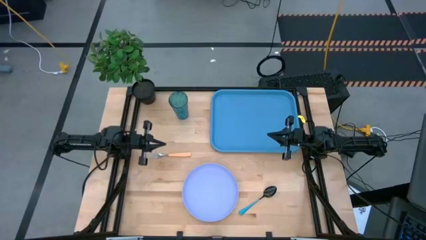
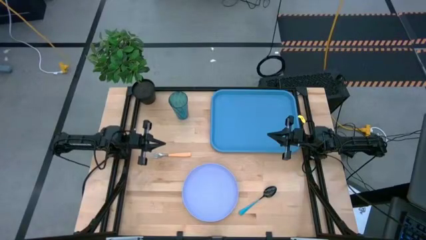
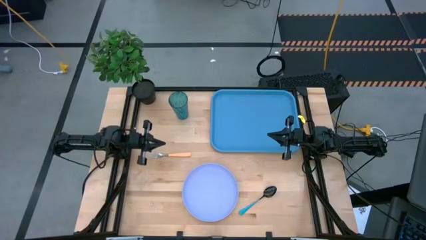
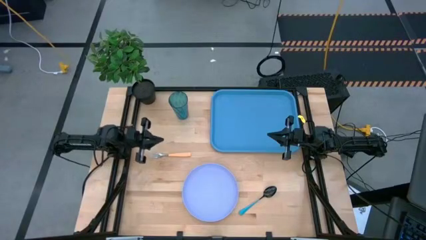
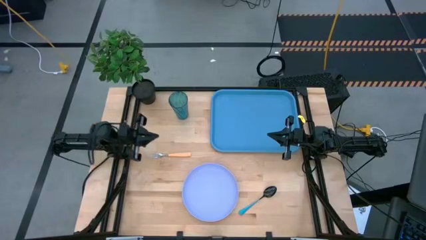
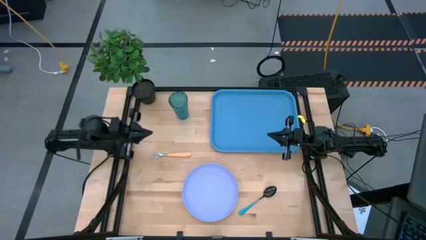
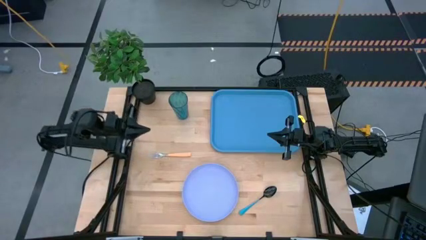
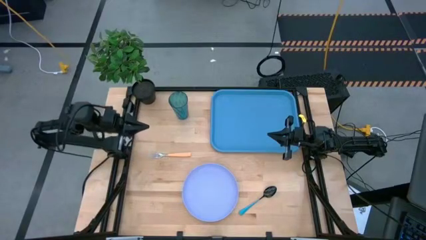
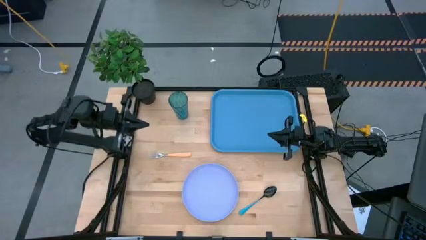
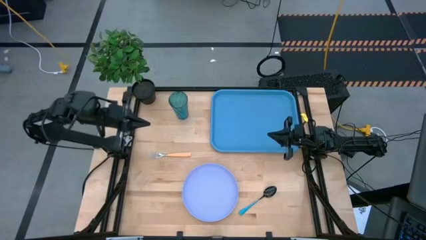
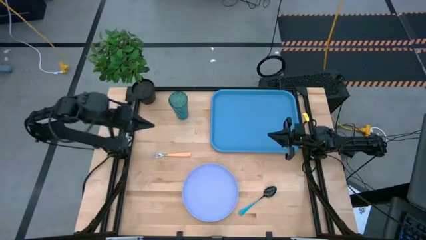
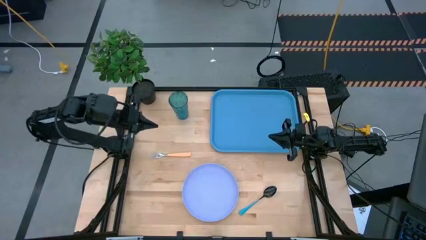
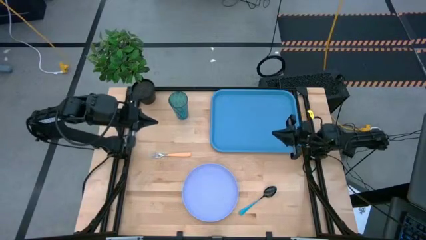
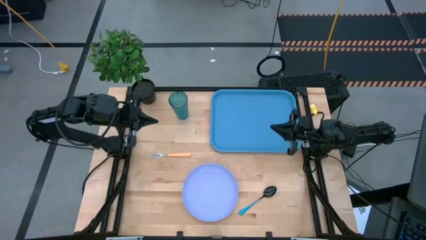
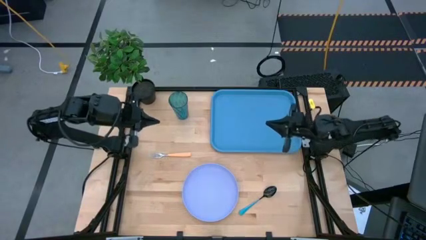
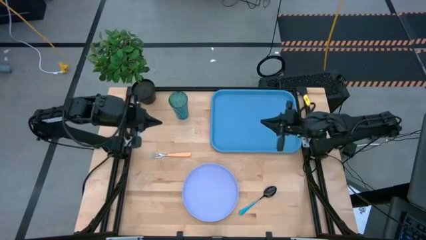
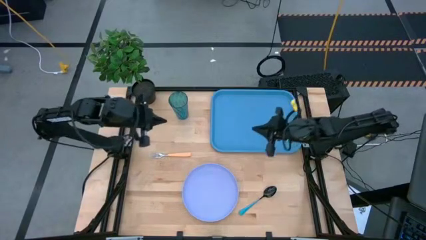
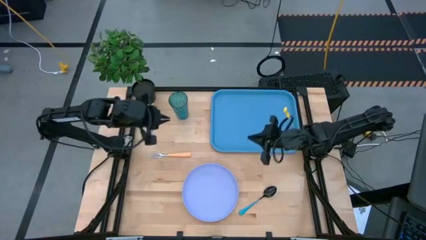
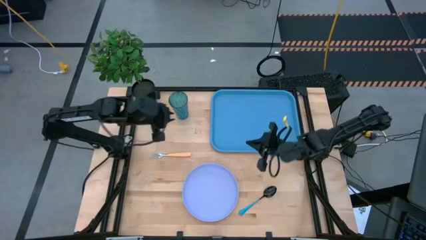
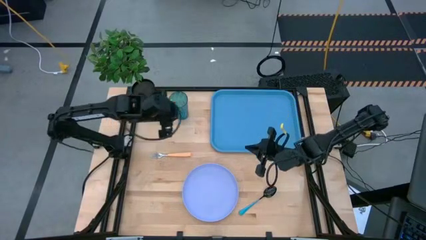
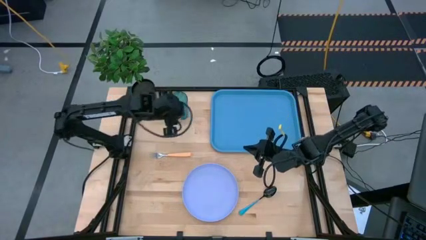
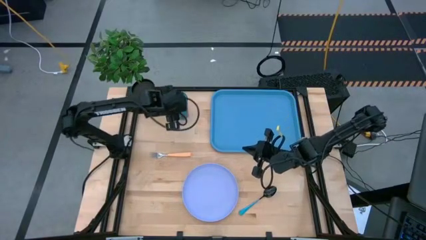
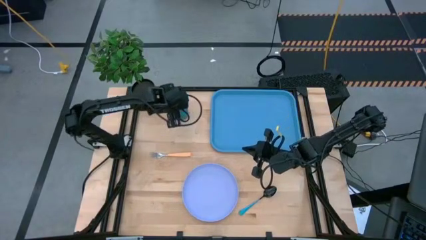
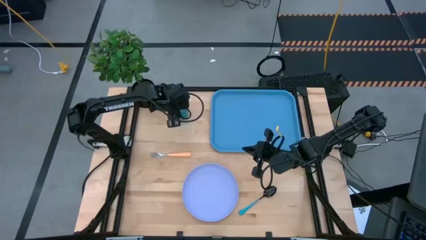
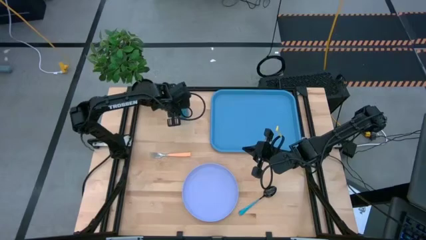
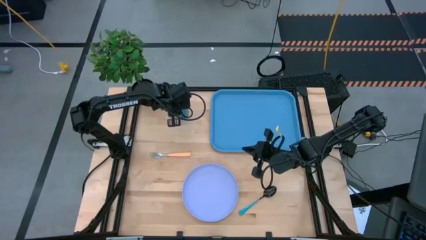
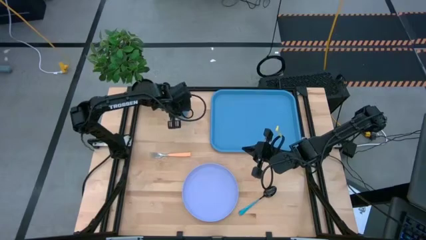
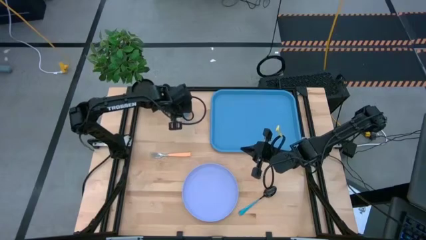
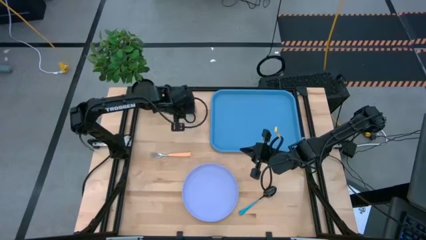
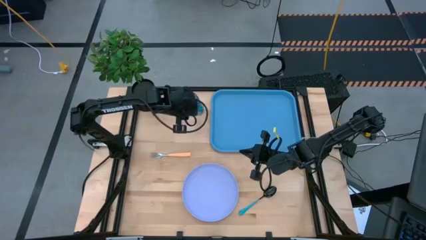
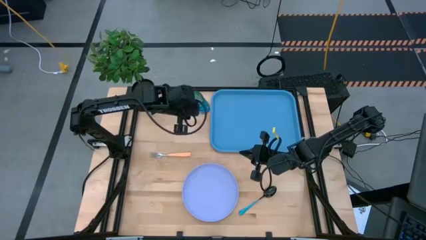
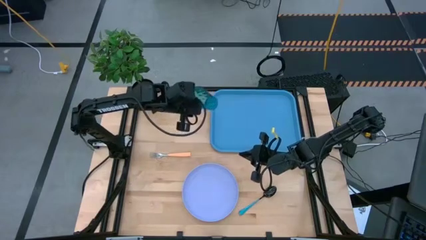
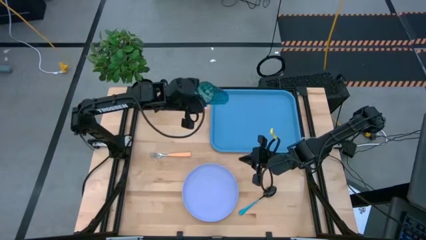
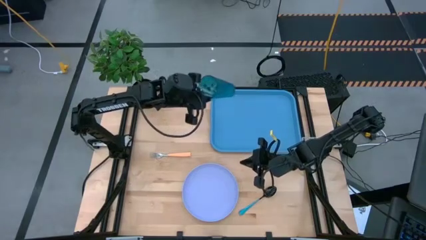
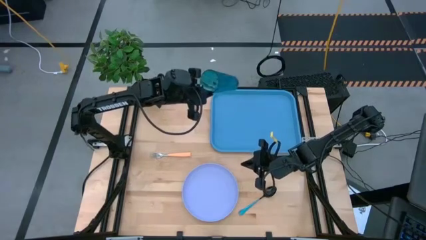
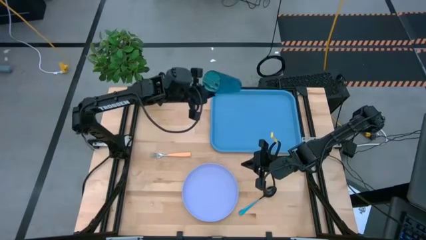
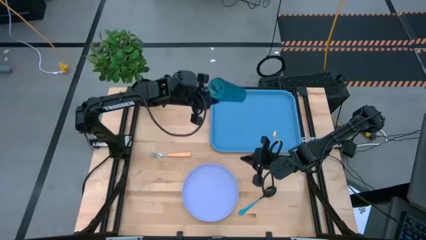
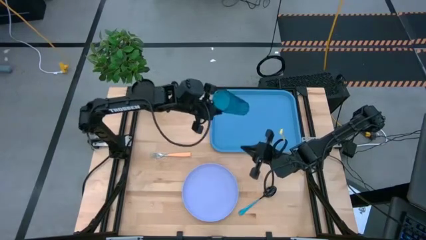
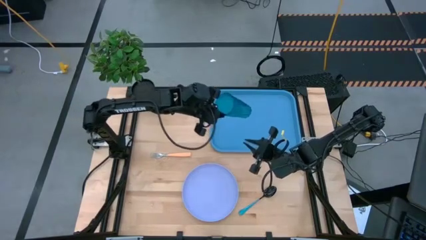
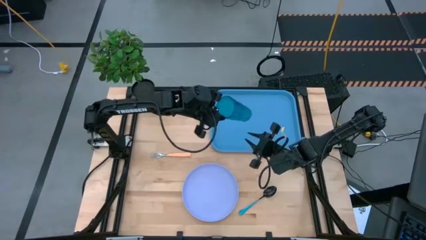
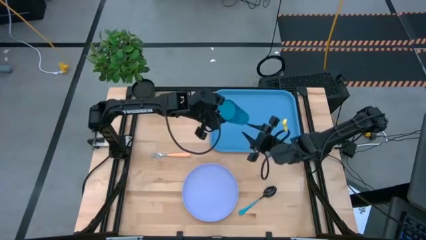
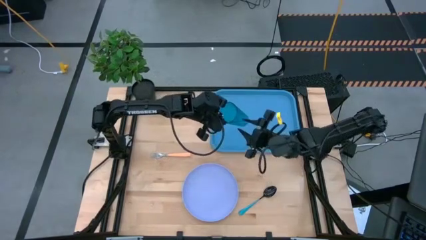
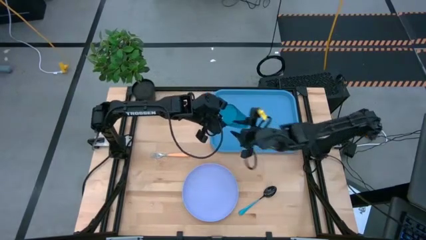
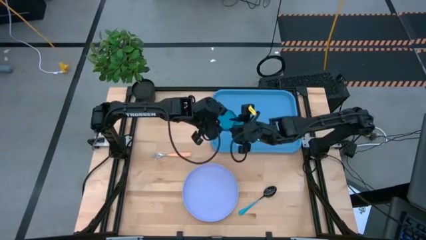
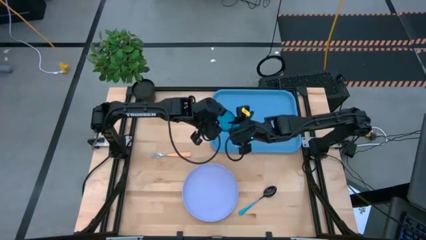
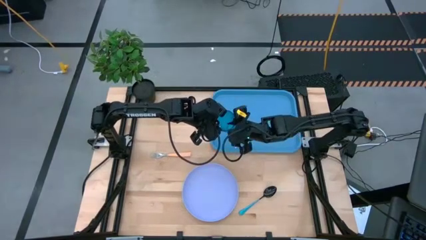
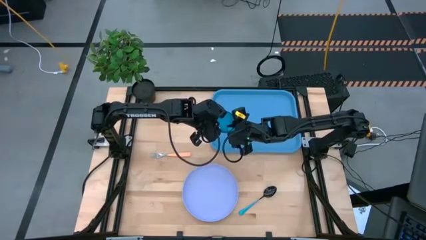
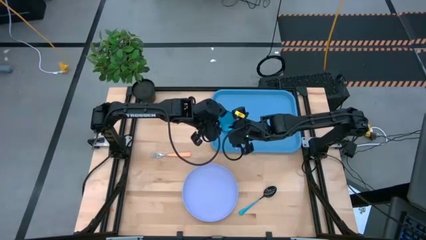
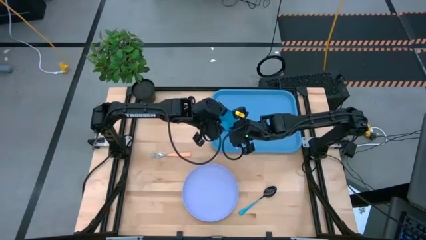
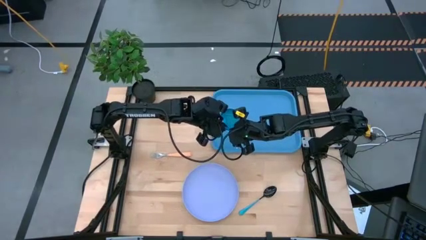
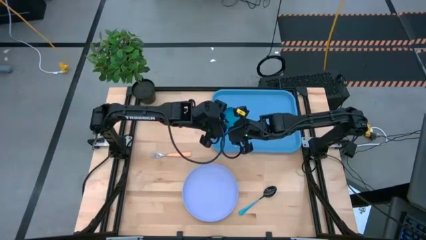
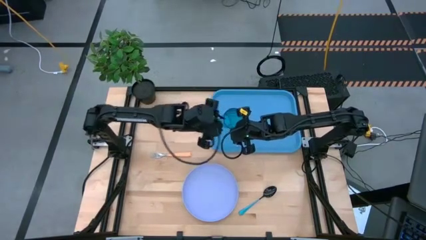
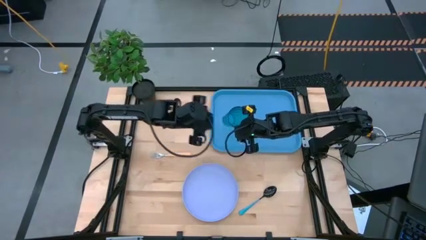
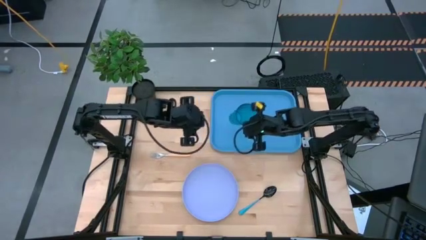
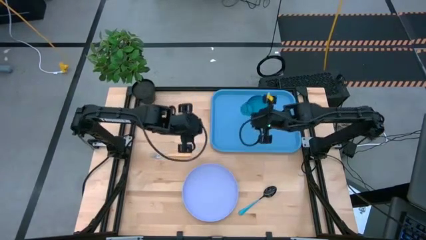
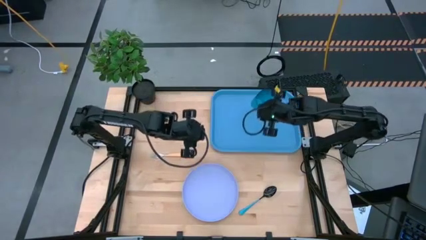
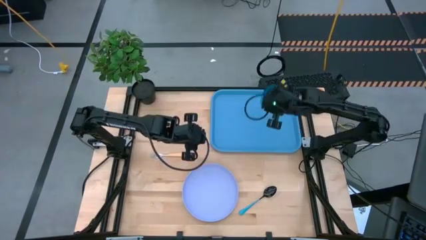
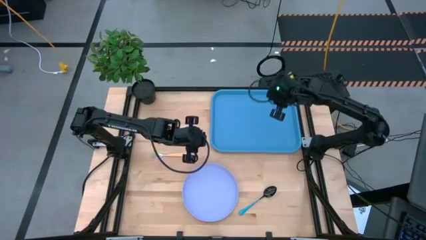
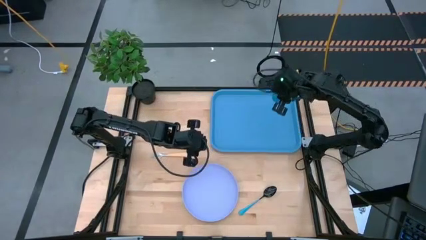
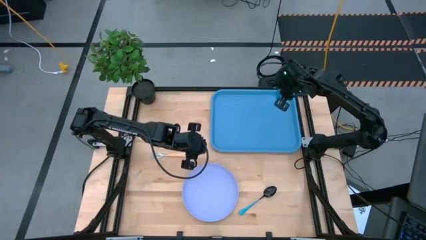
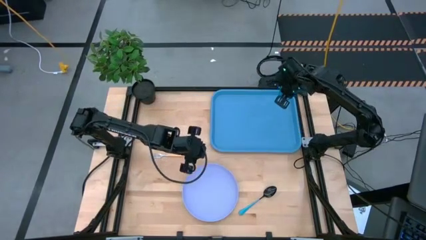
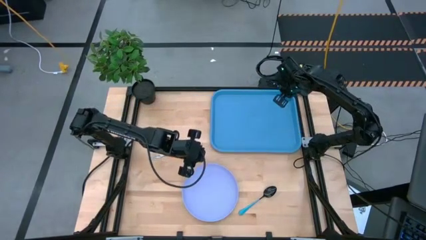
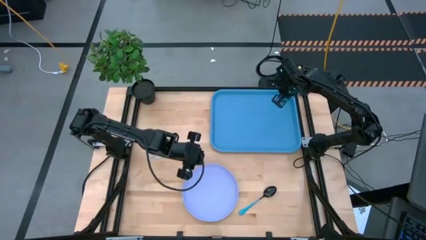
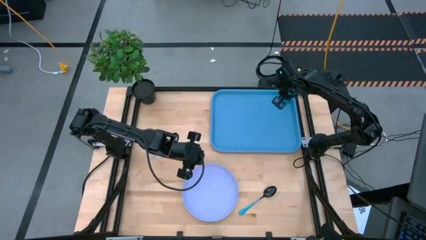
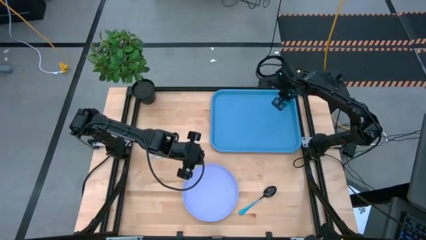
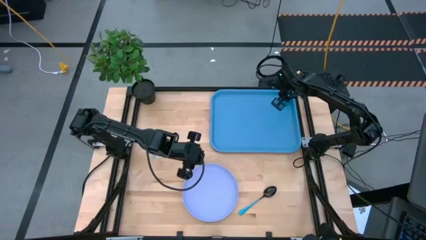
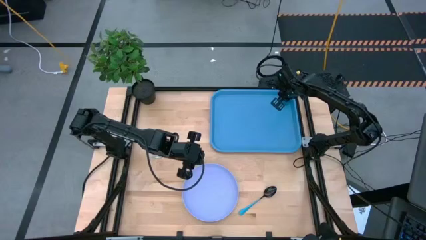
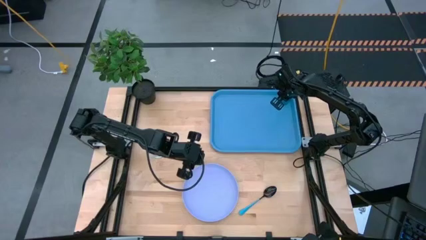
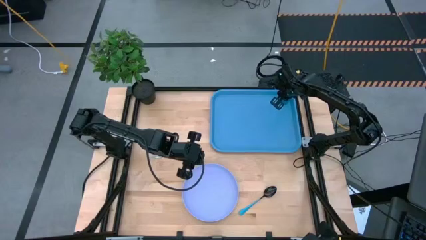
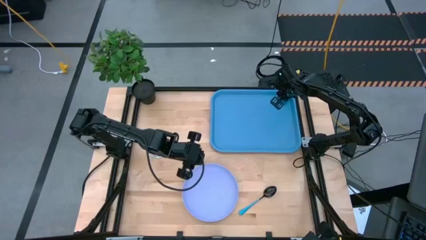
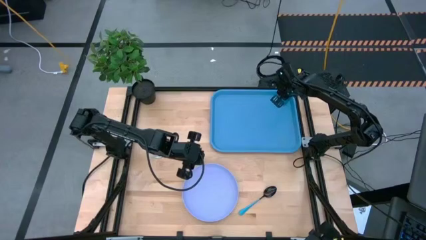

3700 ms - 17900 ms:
Task: Pick and place plate/cup/fork/spoon on tray
Put the blue cup on the top right of the blue tray
